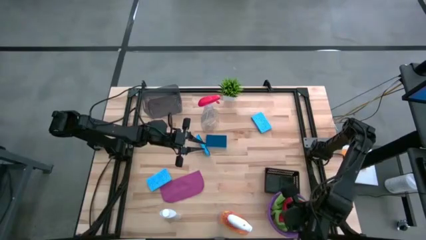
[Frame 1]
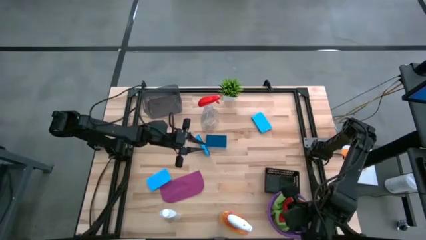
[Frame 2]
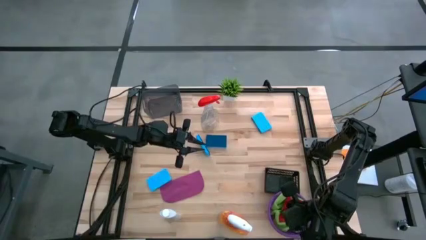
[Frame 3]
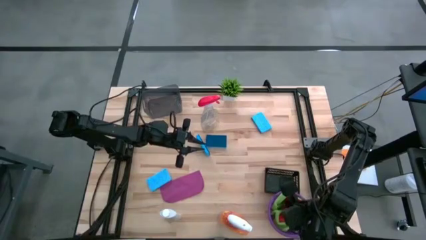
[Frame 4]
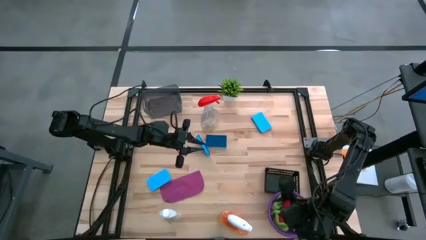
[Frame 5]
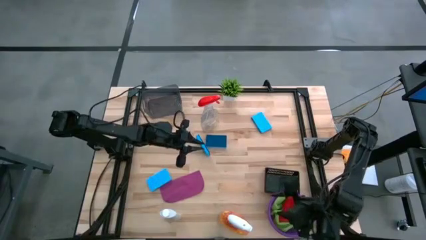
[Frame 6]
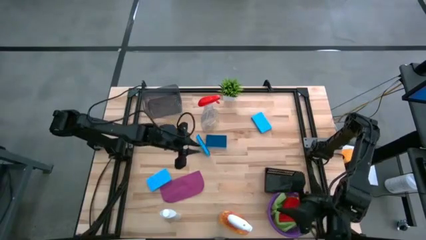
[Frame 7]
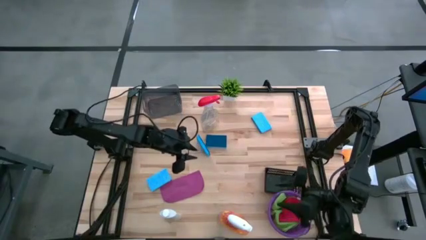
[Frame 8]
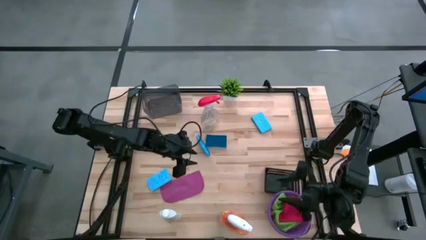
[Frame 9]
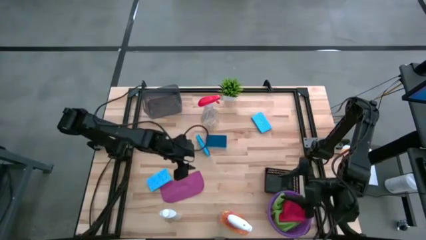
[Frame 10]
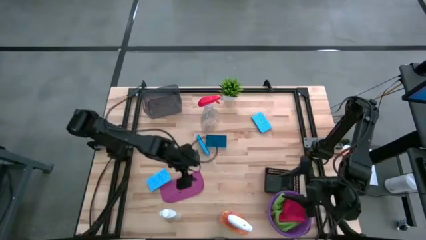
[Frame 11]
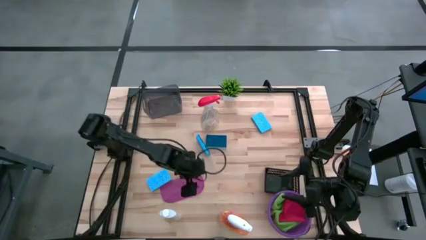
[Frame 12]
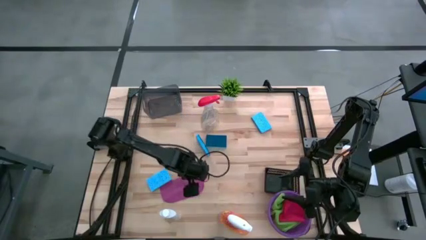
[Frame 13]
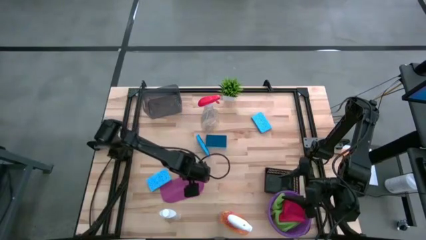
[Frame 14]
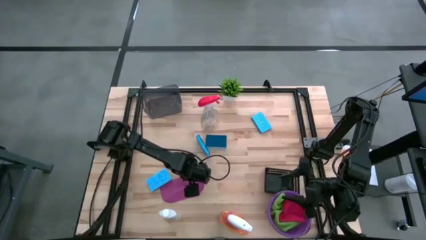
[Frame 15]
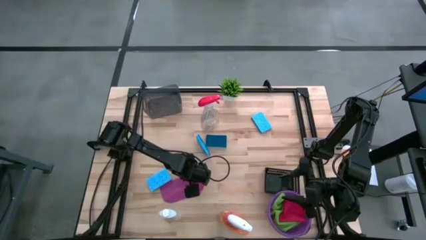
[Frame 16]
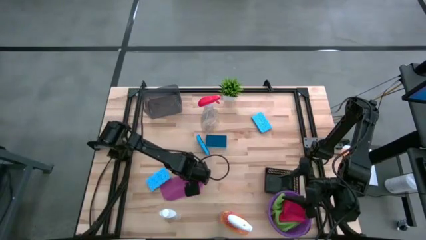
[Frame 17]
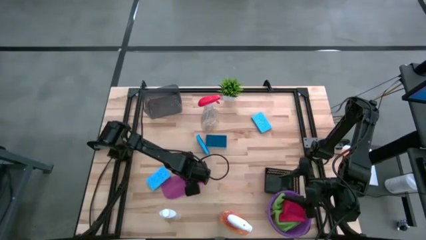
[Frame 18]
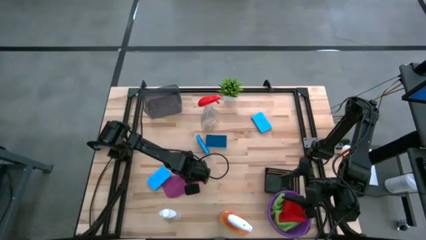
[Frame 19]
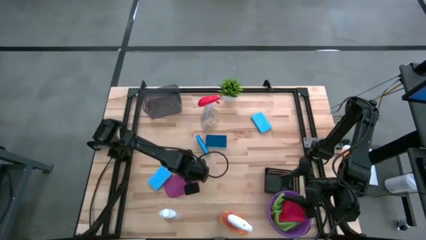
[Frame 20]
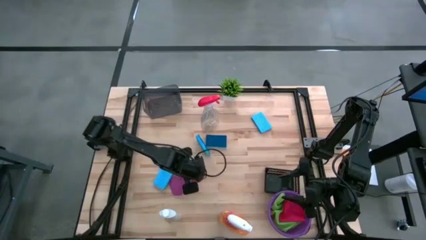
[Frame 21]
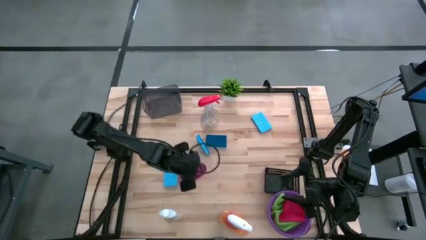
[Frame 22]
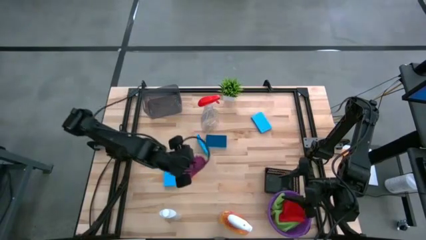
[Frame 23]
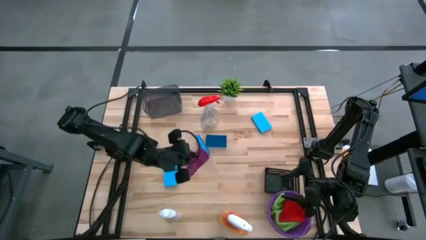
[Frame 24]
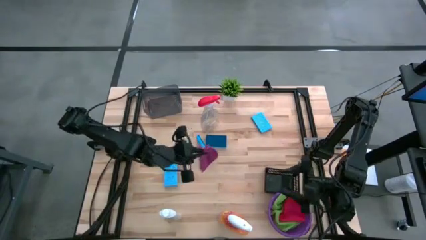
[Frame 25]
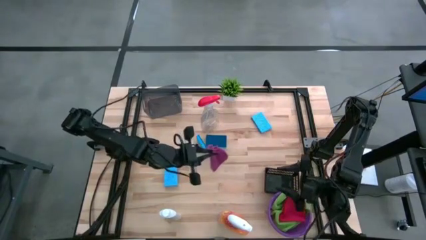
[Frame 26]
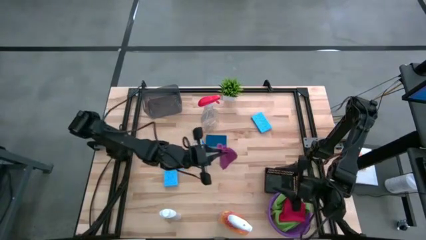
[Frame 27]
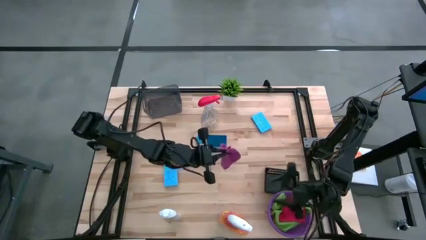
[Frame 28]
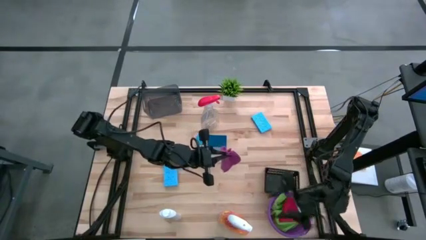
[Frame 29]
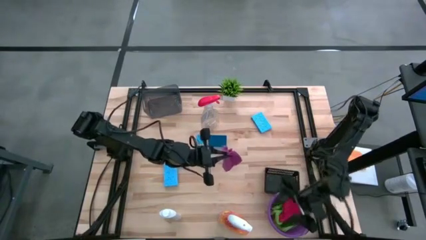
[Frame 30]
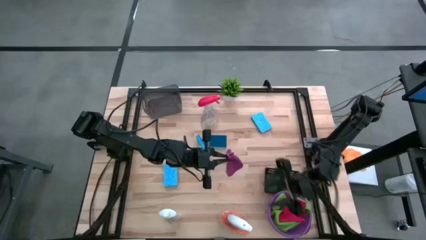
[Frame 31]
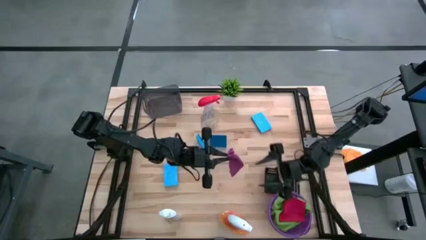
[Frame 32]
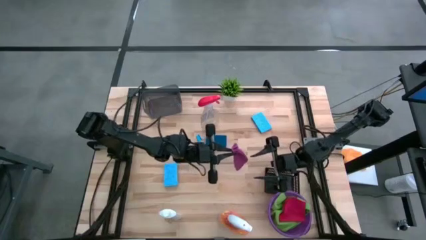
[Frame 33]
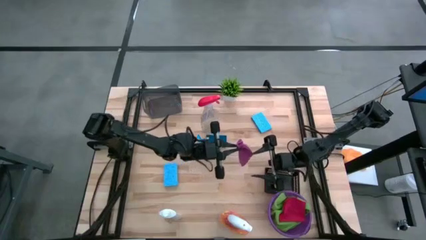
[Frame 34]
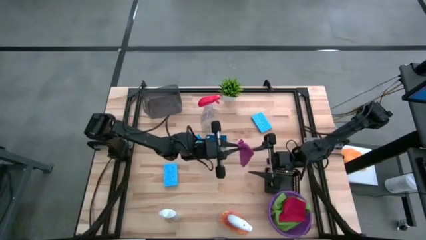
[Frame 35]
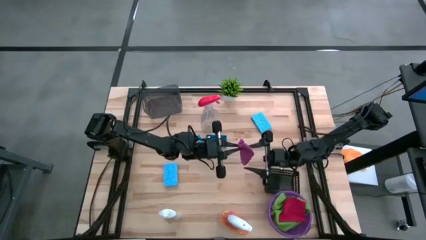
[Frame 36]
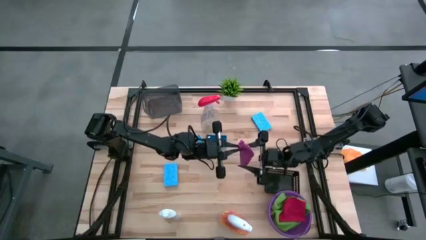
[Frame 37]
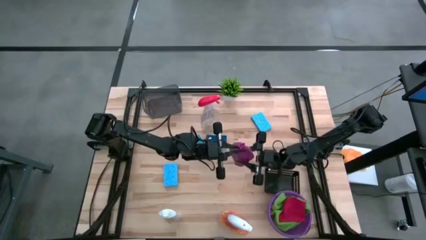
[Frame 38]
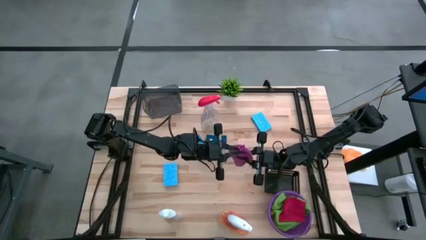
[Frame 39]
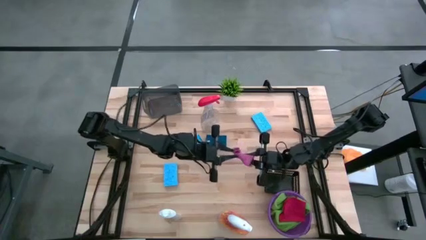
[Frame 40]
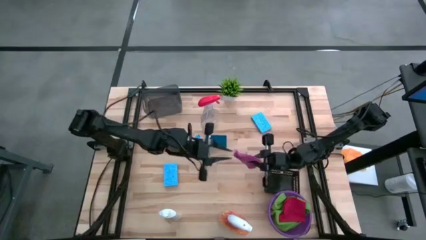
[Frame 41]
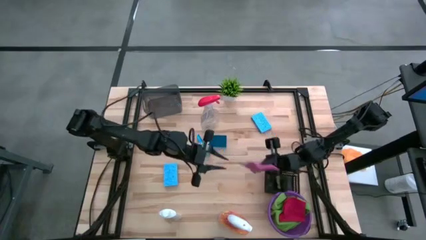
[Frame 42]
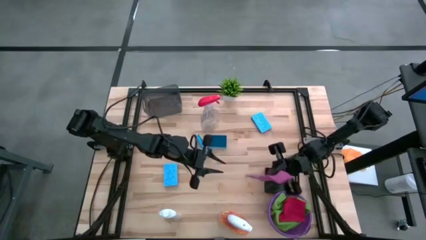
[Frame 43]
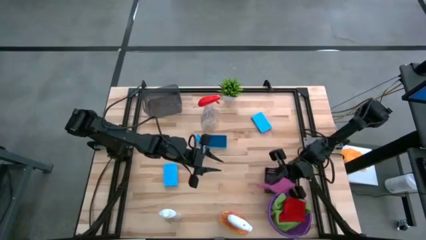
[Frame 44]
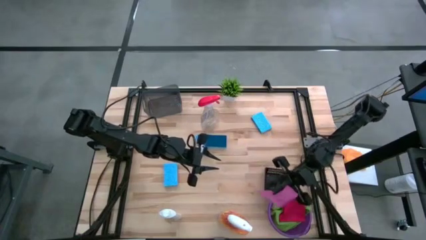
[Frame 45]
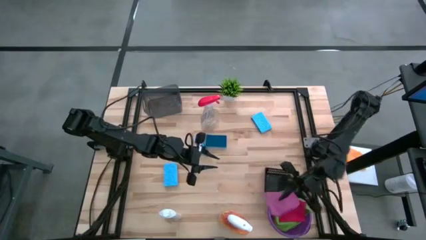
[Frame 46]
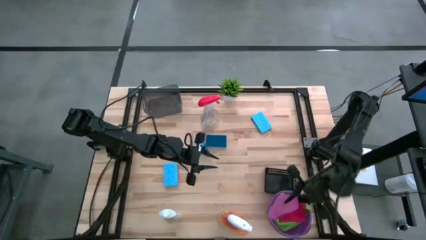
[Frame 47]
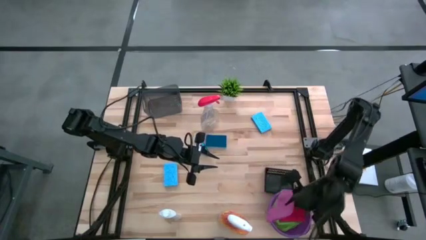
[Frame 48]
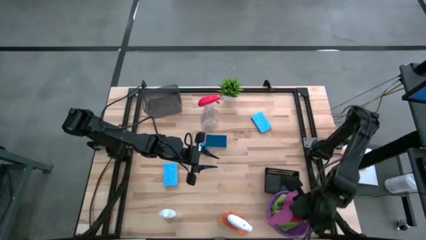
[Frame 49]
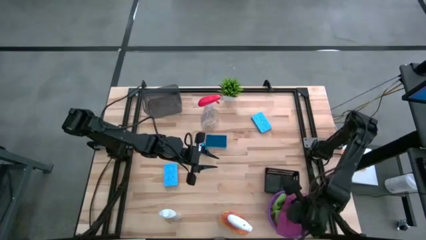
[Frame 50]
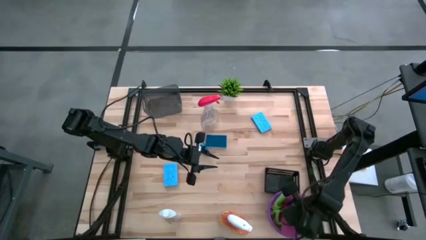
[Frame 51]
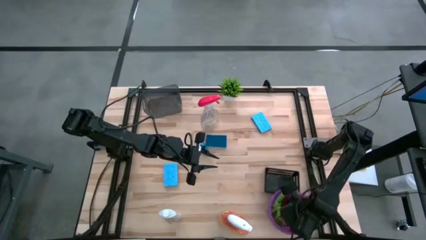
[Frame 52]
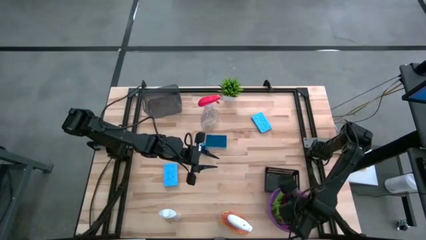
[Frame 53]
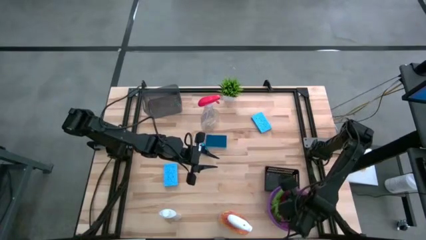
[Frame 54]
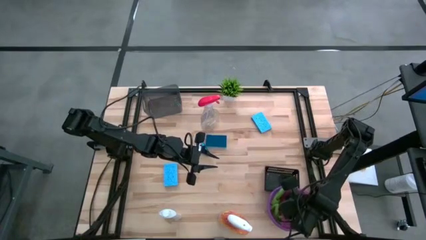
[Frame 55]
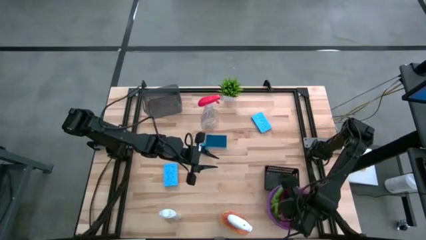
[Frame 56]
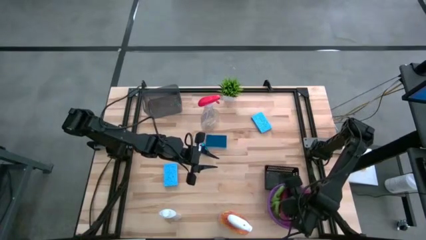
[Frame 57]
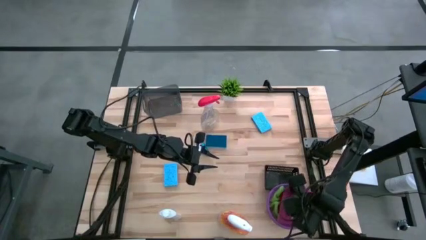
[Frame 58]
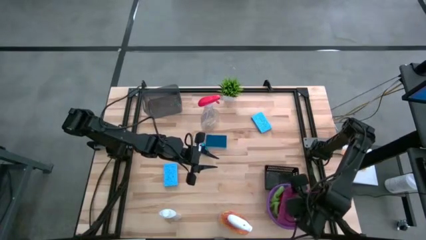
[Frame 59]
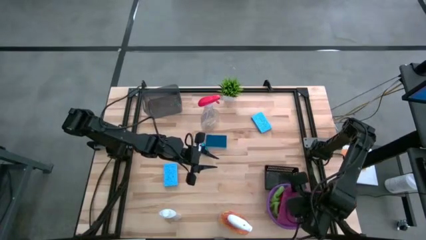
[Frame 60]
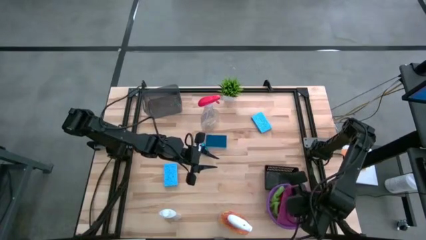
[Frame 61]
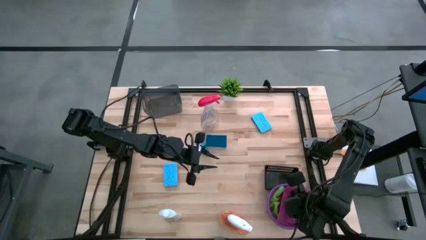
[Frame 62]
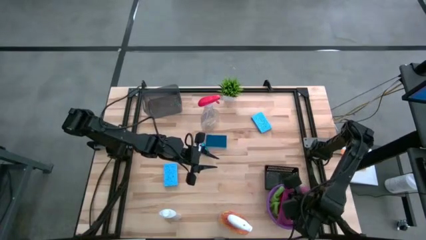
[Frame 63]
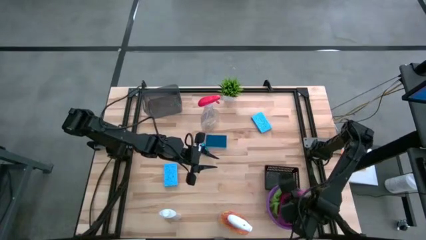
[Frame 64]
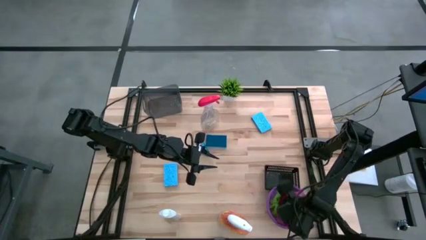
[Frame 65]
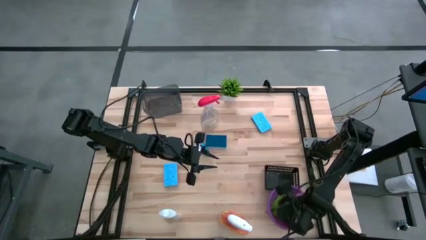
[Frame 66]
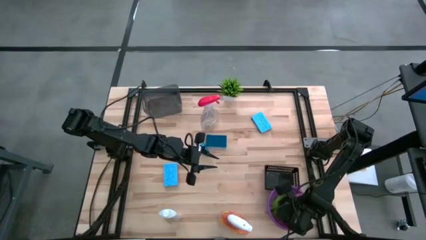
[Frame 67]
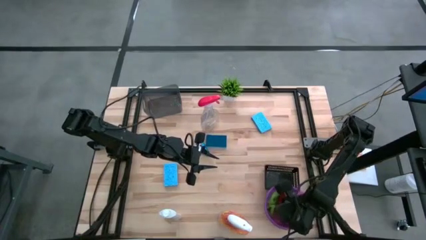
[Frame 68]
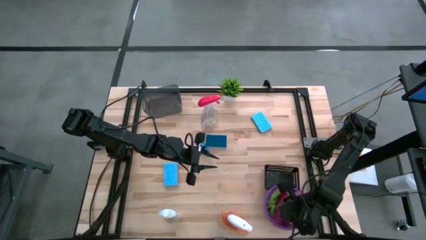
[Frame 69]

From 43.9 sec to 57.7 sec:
Task: Pick & Place Kitchen Items
Put the violet towel into the purple bucket

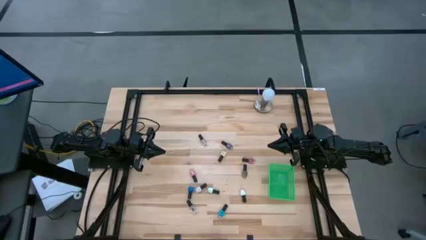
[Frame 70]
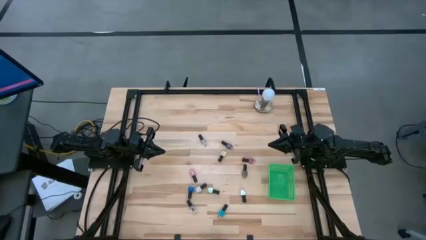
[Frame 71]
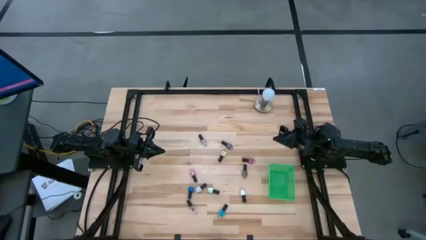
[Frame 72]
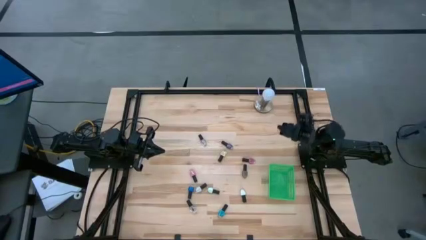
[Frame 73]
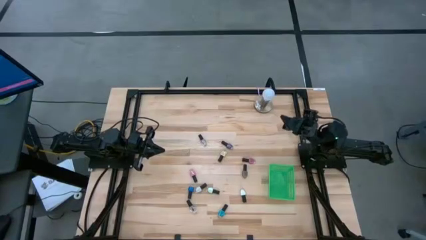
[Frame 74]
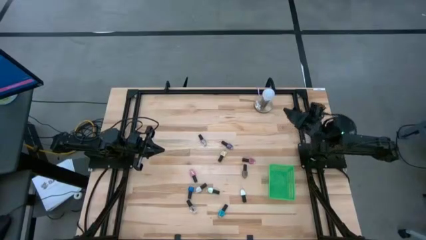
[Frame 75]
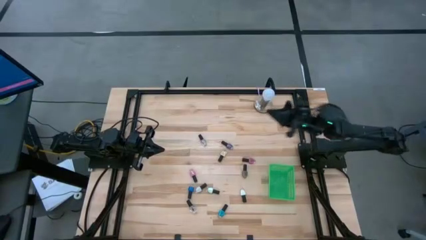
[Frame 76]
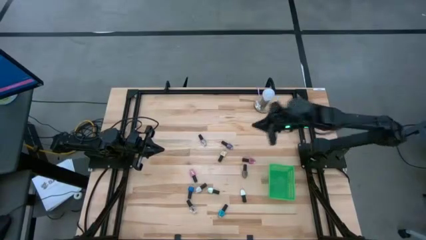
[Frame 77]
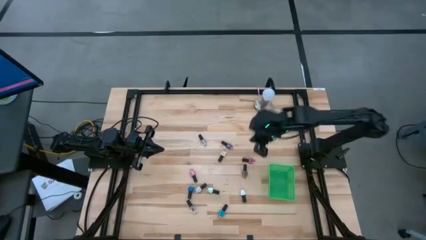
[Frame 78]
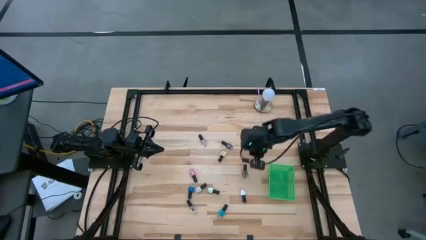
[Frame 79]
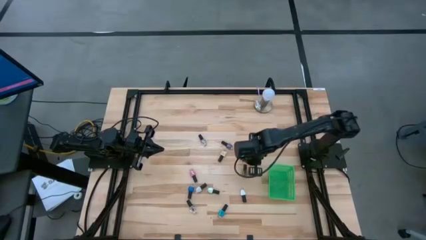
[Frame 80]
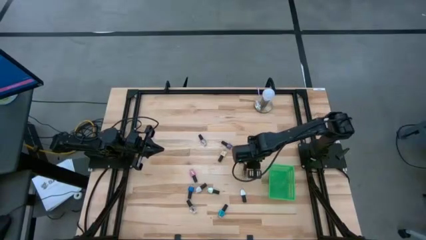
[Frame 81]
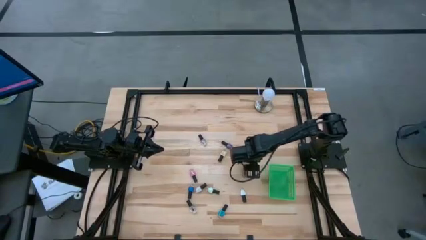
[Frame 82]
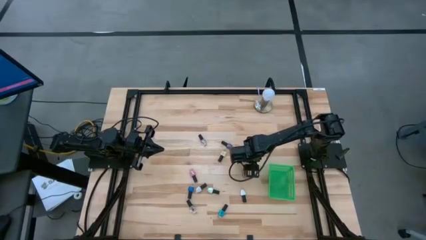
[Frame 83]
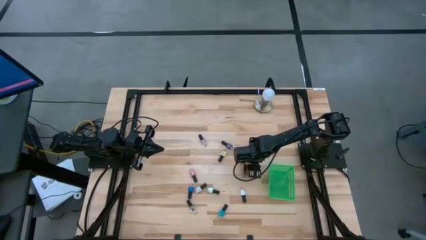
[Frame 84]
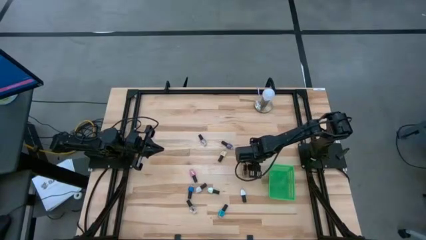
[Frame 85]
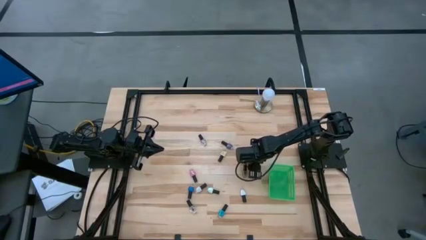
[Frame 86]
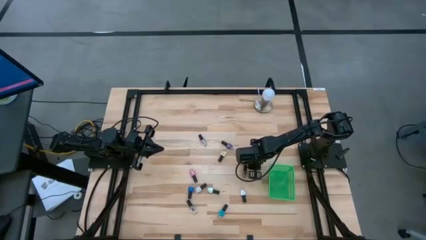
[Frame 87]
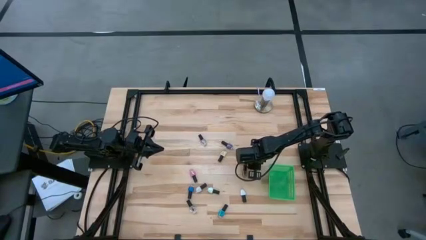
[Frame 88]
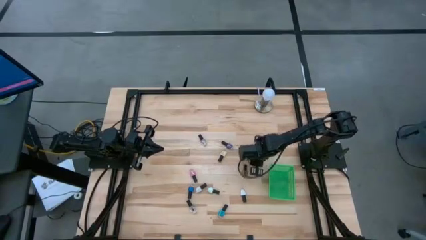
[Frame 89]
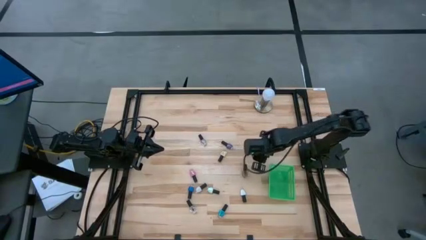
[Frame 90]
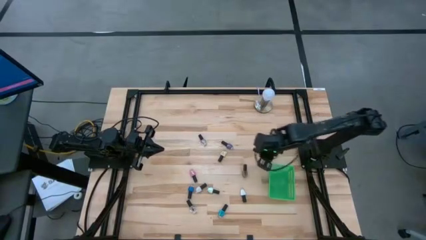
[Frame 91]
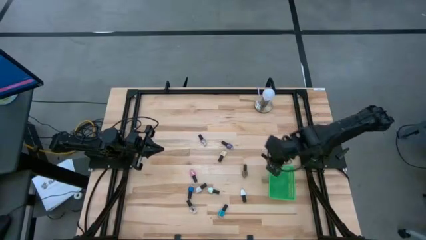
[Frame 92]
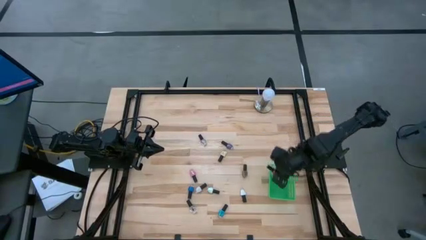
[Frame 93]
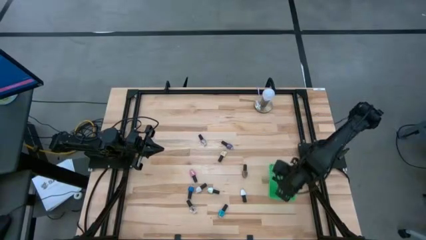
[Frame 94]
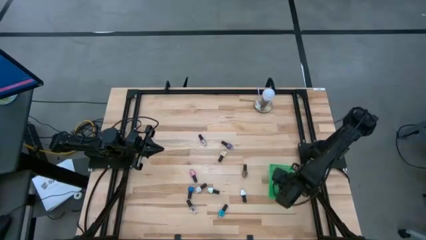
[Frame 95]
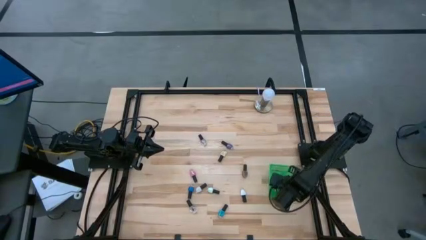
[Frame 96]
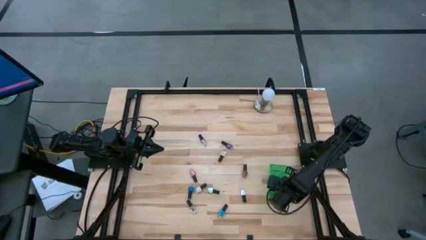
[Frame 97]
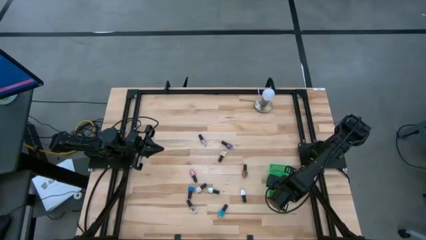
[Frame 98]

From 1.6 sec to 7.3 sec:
Task: Pick & Place Nail Polish
Put the red nail polish into the green bin
